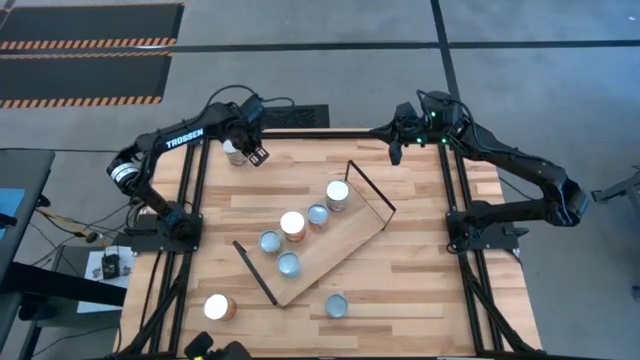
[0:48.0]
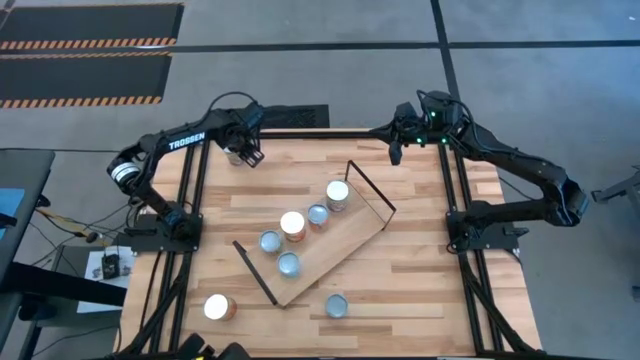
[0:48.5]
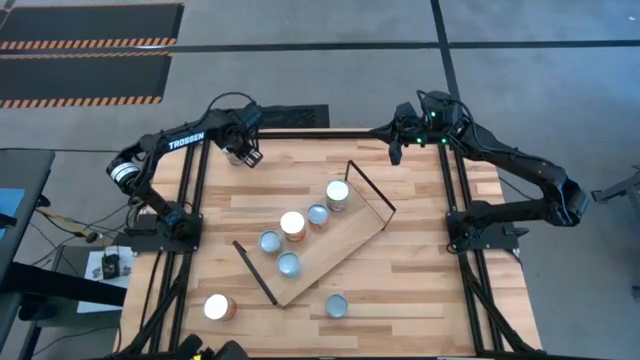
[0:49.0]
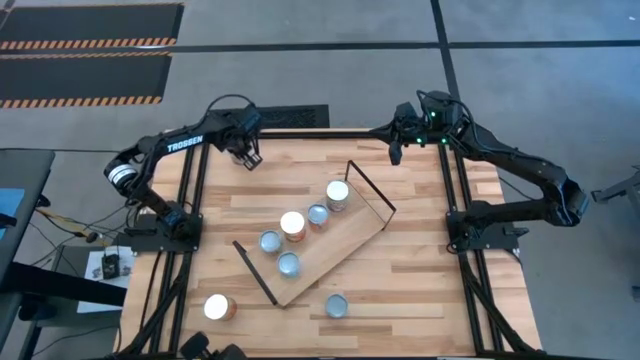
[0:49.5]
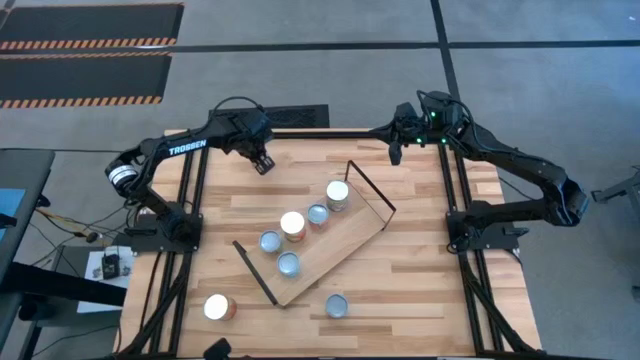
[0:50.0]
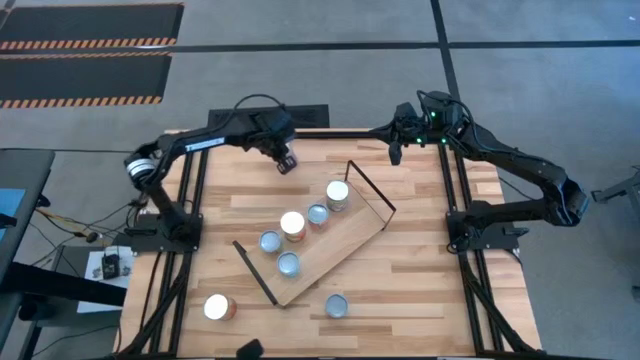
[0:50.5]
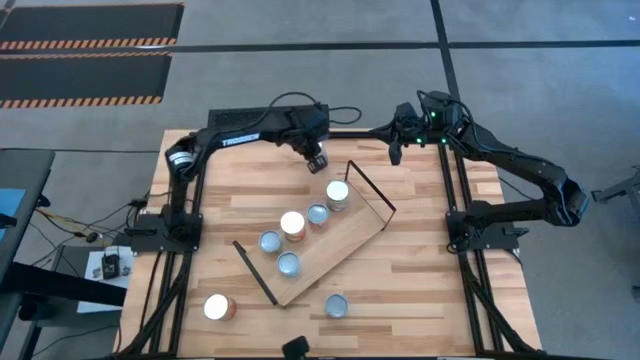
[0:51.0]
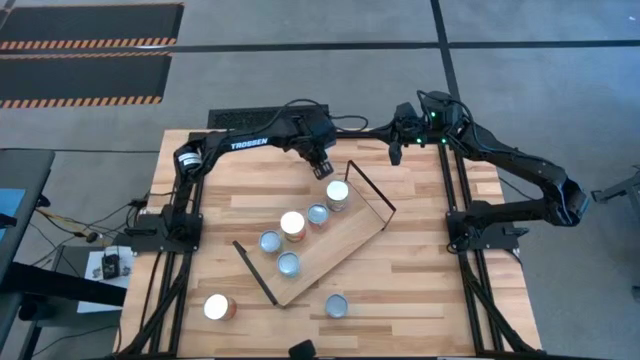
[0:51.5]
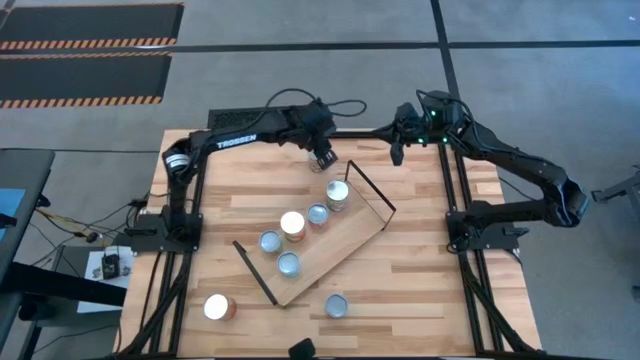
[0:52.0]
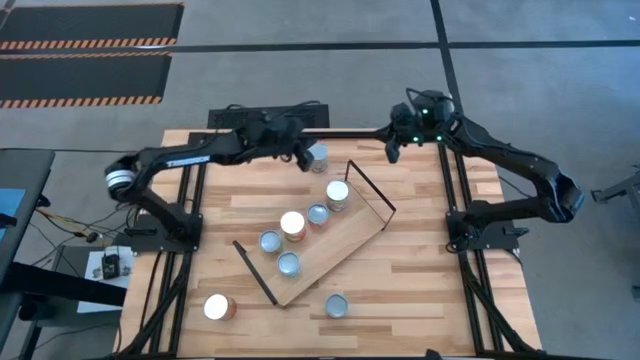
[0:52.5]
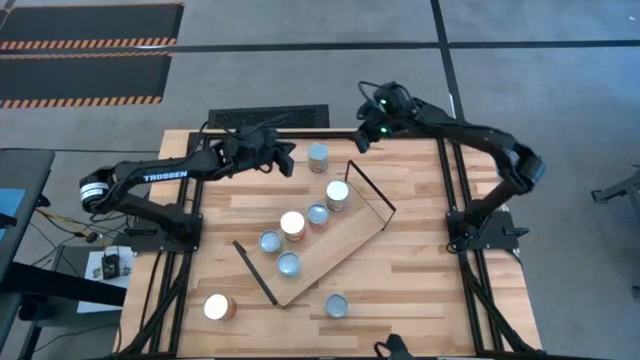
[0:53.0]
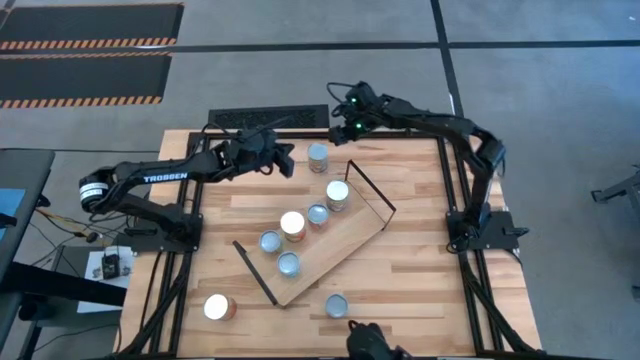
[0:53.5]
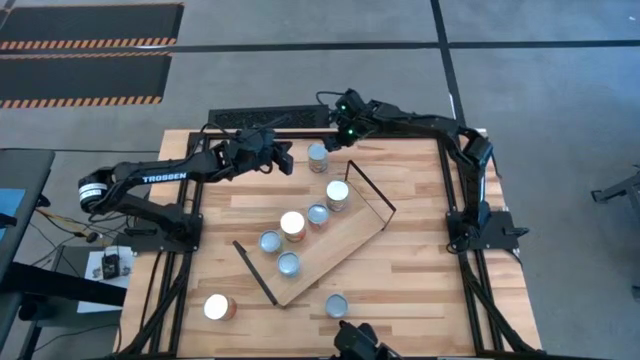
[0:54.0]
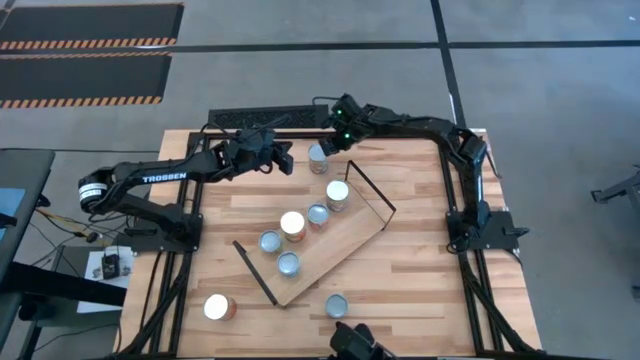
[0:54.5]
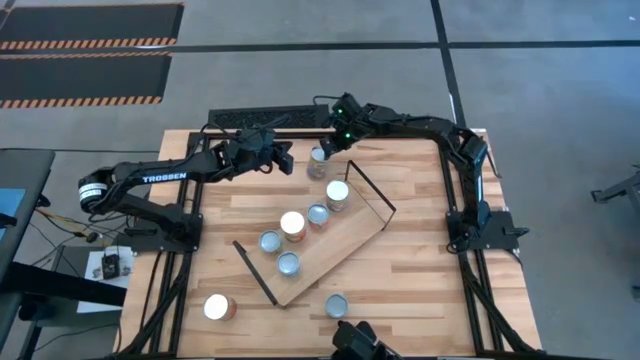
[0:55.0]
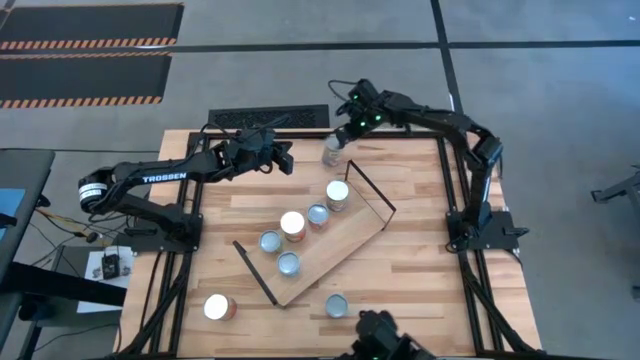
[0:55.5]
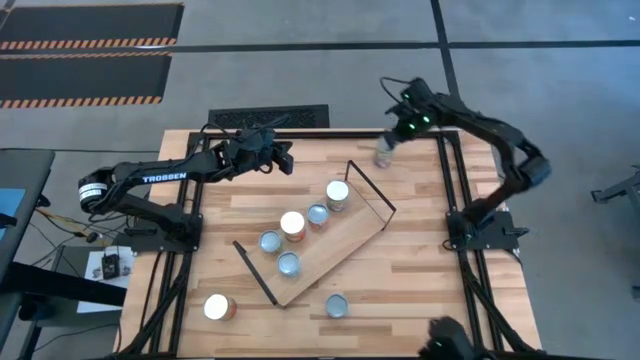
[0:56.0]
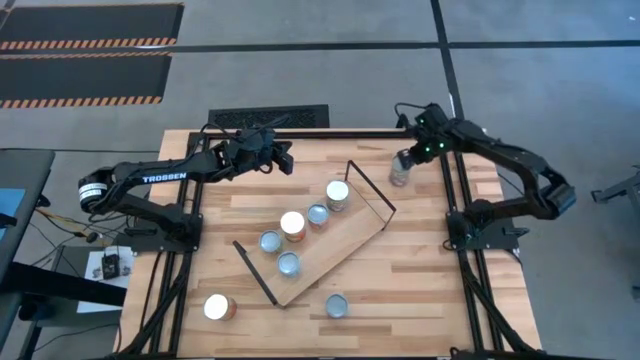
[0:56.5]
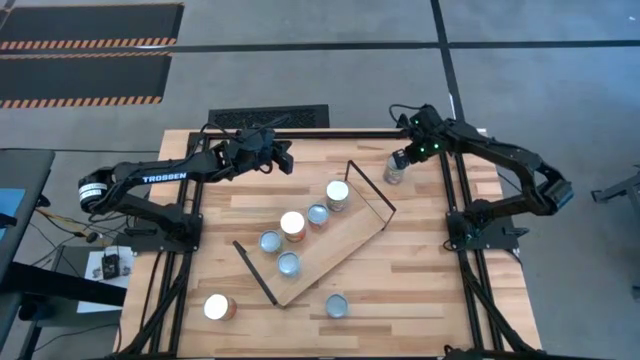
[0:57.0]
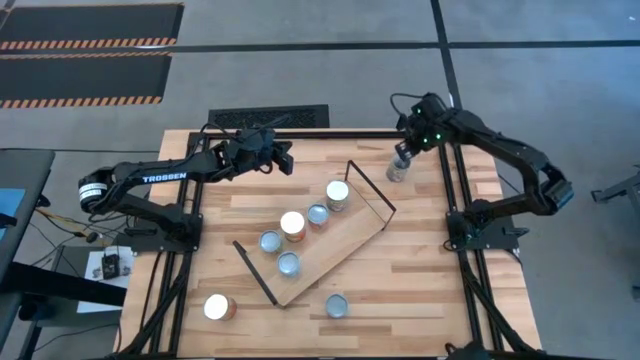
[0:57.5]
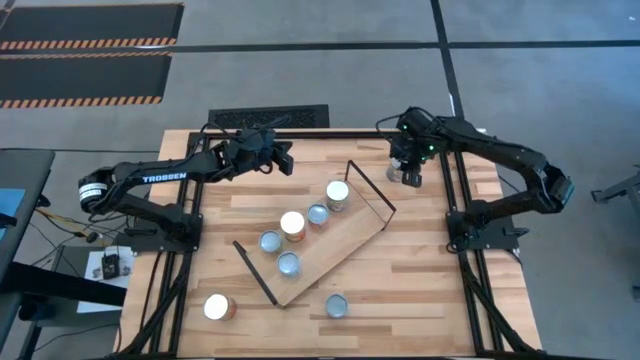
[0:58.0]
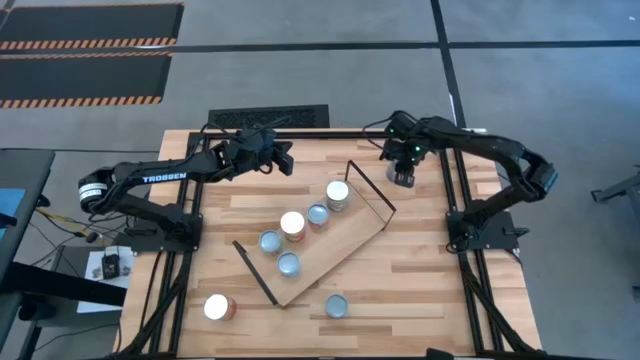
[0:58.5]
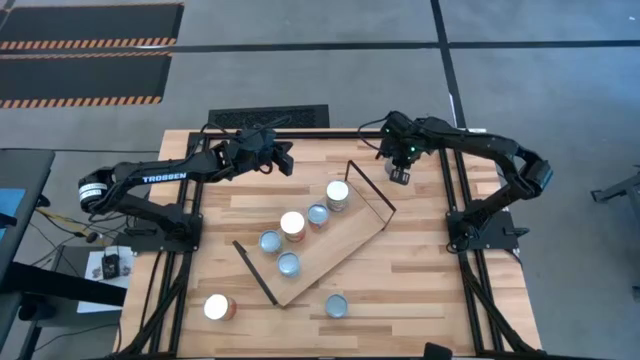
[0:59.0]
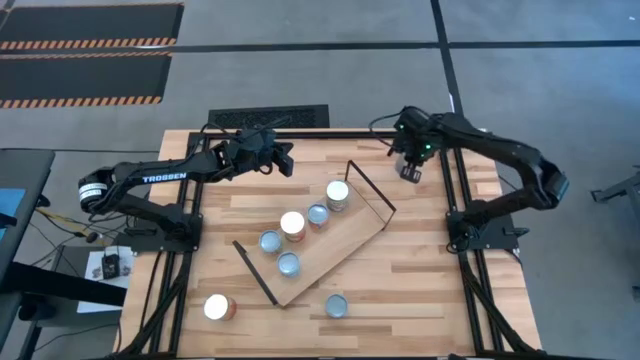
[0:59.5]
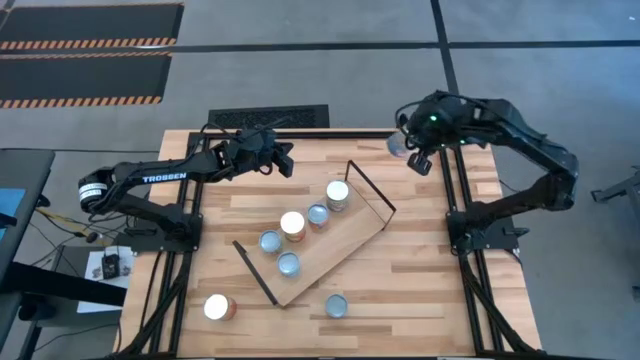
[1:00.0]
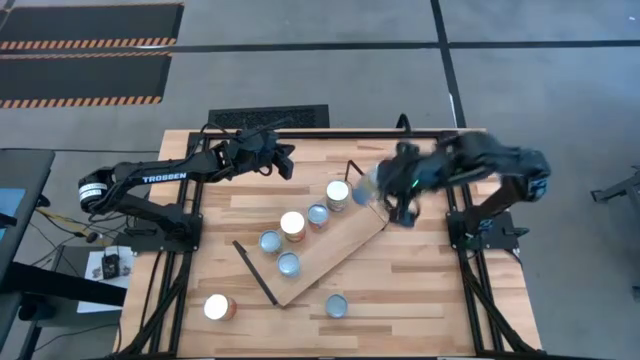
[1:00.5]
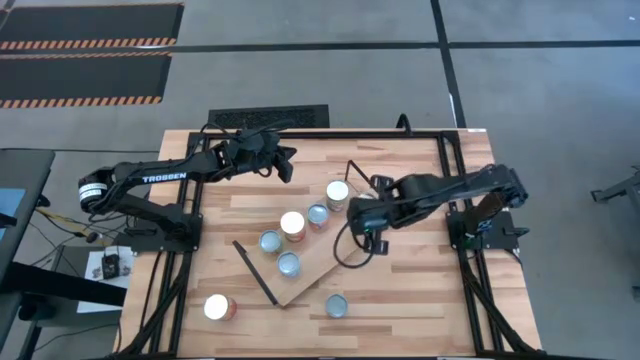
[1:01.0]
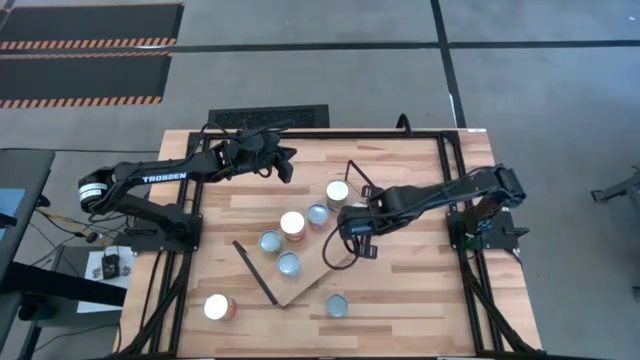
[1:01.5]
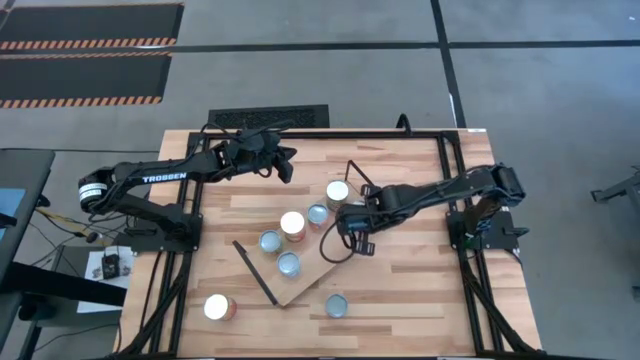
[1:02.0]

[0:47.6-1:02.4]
Task: Pick and place cans onto a shelf
Put the canned peaches on the shelf aligned with the other canned peaches

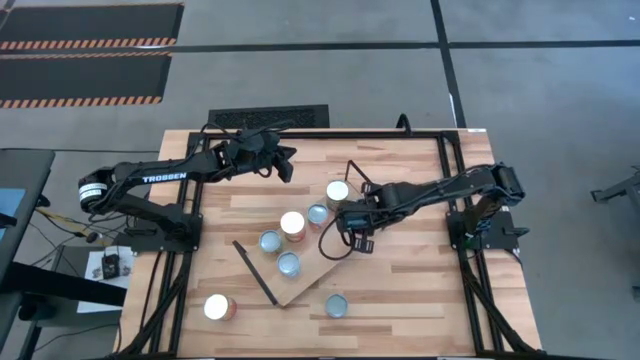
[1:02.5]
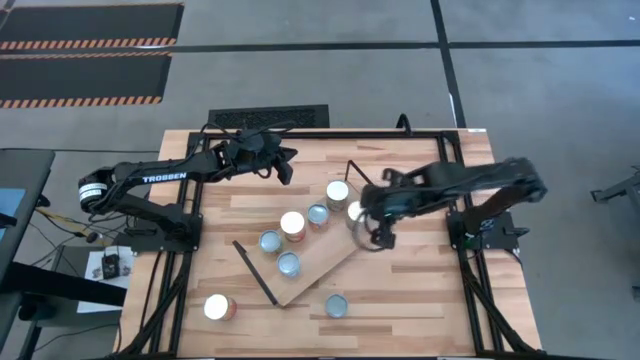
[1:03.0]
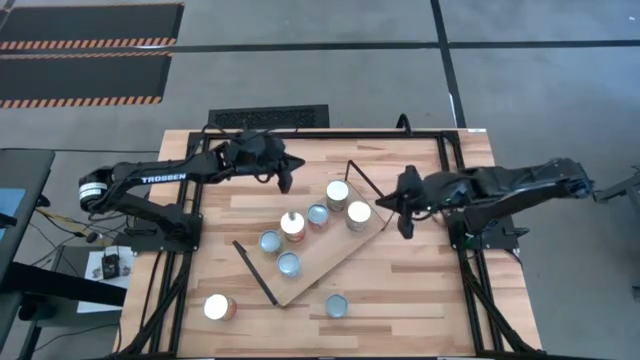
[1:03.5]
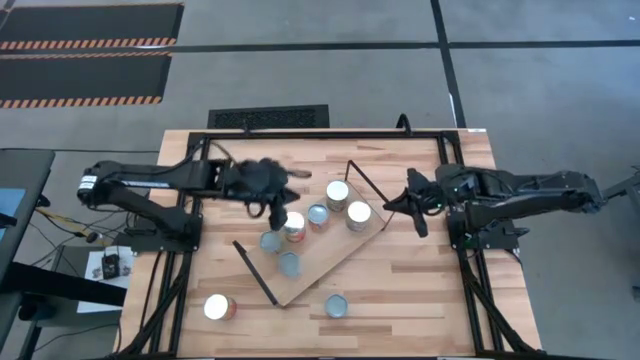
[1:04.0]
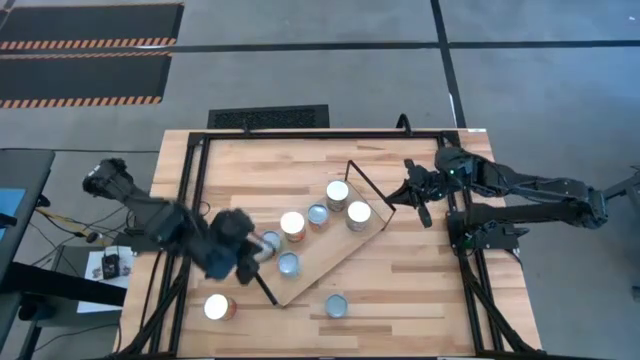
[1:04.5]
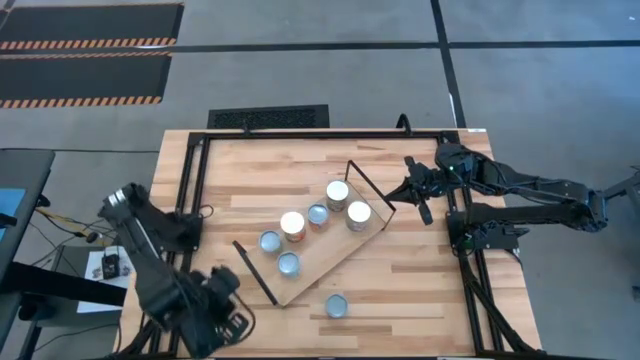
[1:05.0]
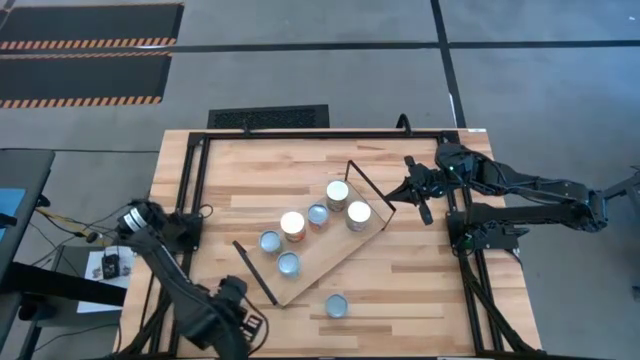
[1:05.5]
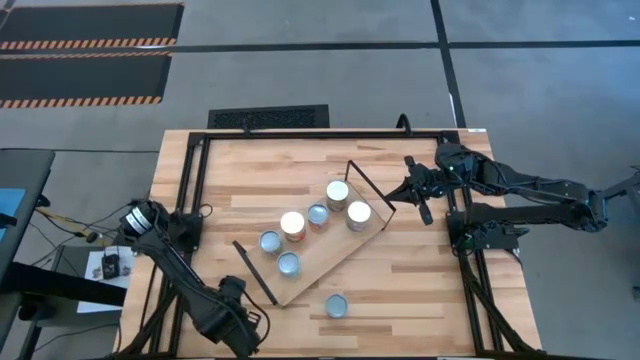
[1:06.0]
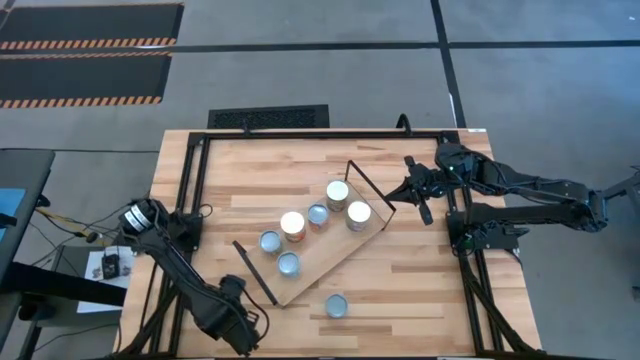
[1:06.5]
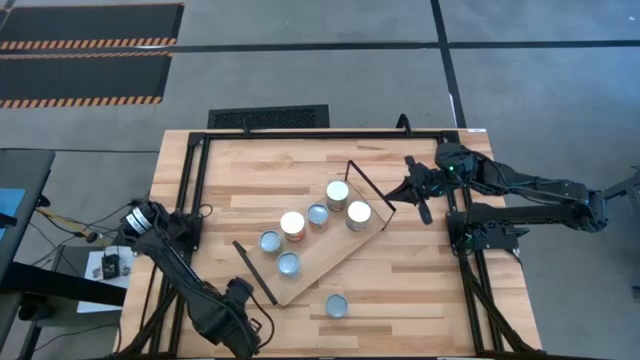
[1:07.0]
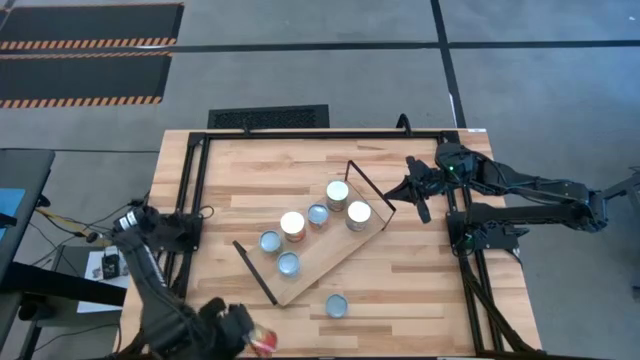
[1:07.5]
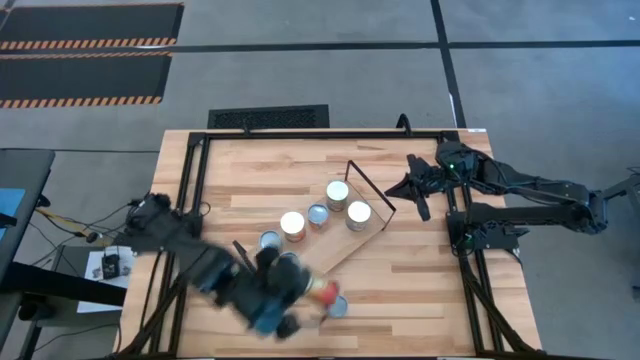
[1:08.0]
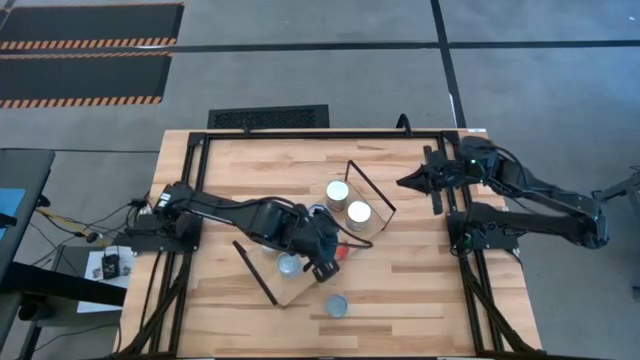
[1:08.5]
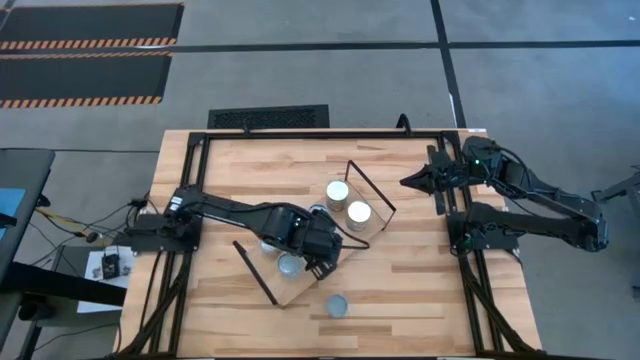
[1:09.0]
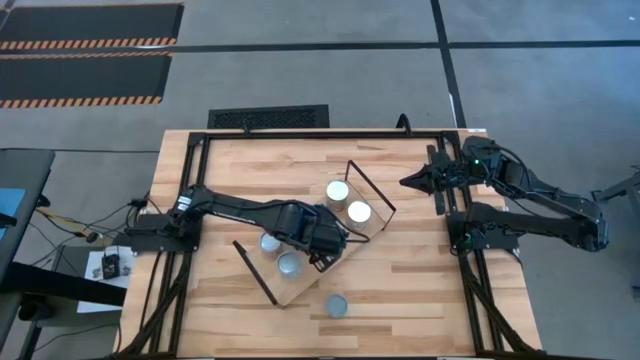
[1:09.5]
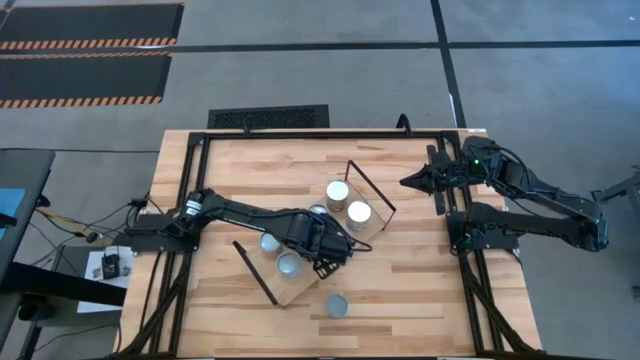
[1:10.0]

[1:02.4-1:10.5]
Put the canned corn on the shelf aligned with the other canned corn
